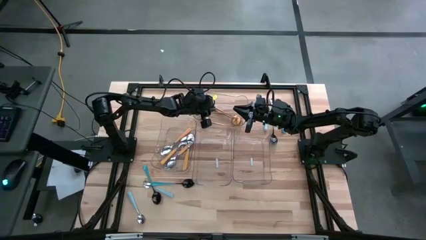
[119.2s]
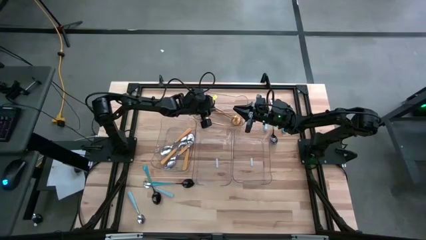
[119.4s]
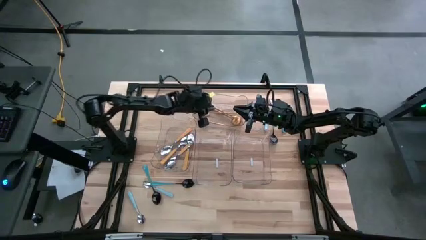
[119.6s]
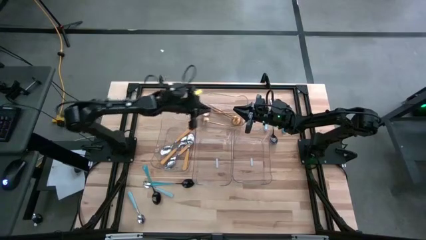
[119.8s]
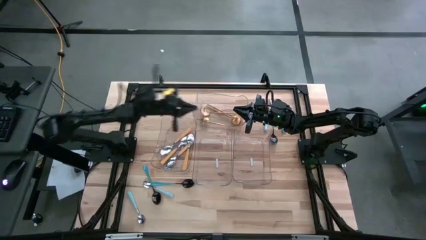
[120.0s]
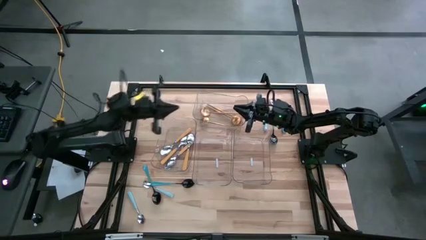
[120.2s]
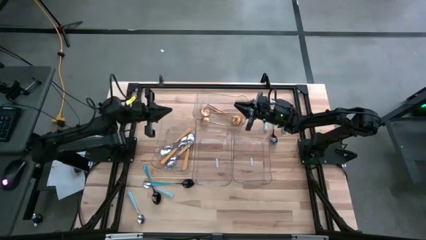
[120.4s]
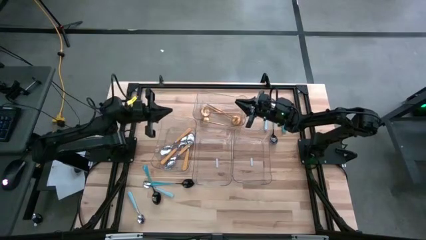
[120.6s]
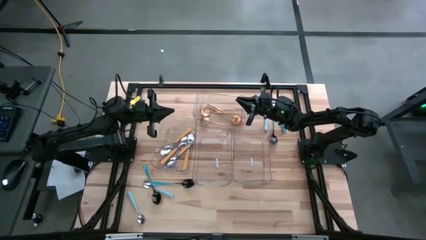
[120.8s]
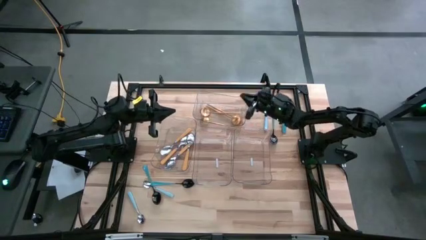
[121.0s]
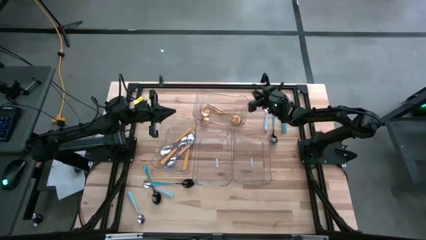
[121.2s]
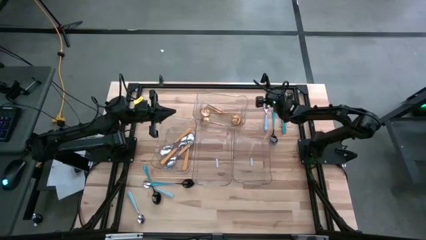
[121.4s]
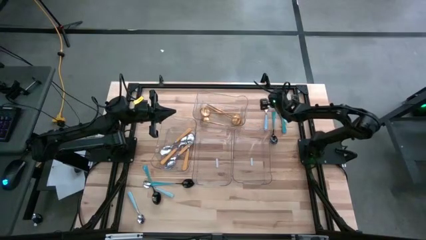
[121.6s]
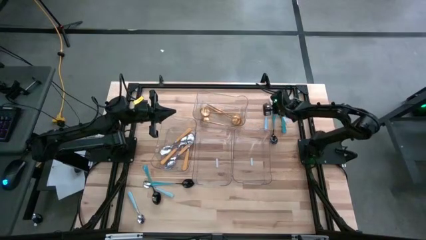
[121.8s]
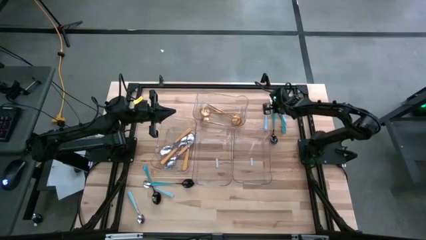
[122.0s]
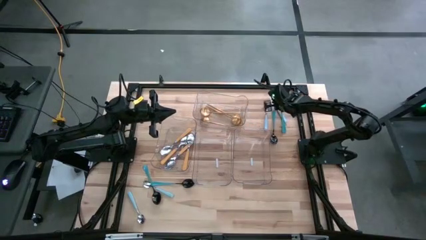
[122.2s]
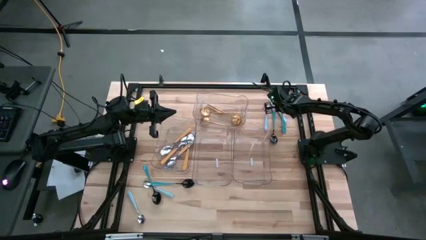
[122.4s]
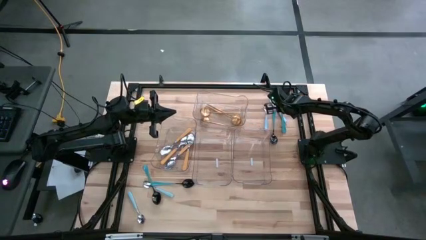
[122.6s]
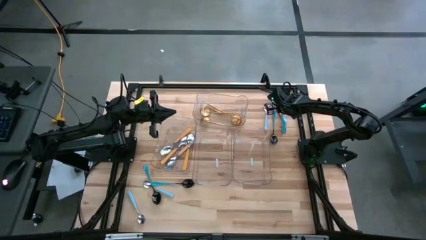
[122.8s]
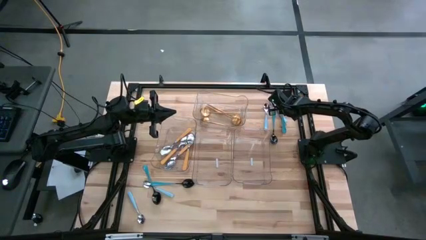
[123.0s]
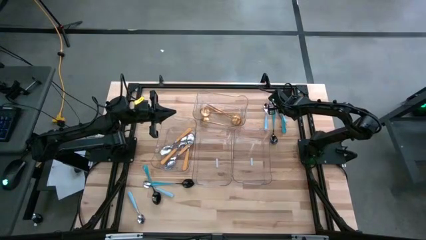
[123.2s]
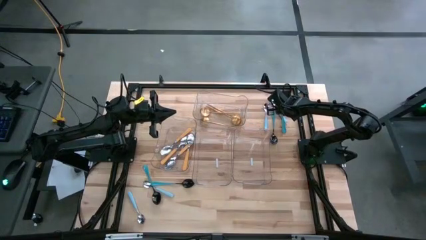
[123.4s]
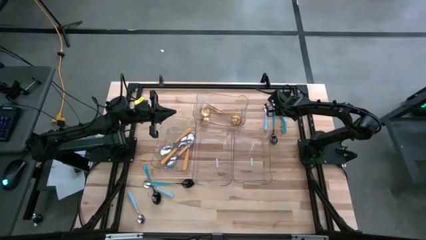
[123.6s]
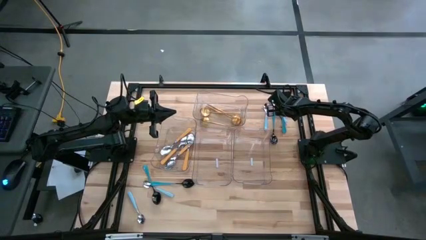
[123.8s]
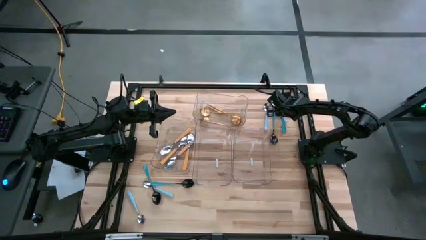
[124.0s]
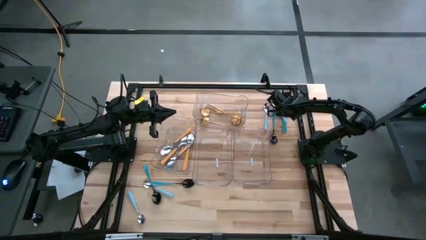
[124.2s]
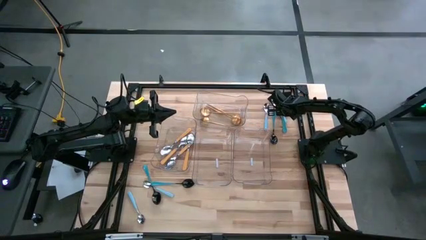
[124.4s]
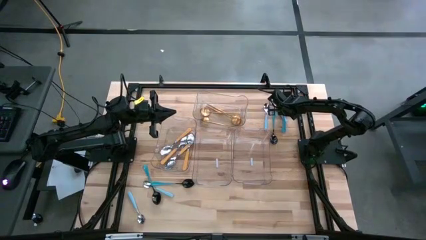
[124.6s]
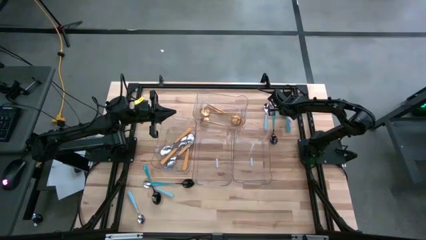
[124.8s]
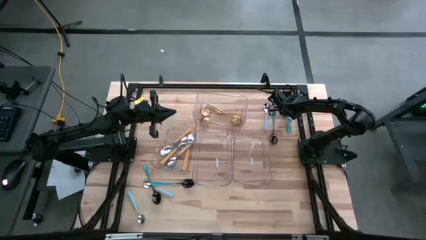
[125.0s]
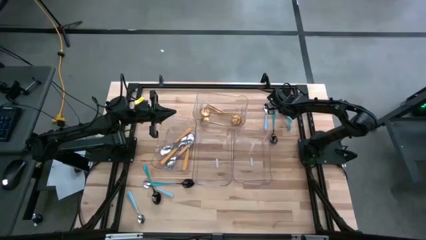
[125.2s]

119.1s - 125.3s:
Task: Sort silverware by color (type)
Put the blue spoon into the right transparent bin

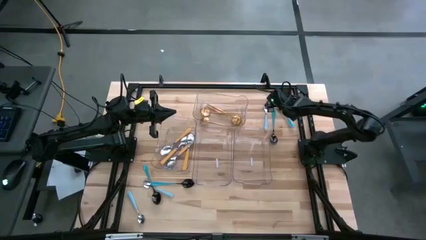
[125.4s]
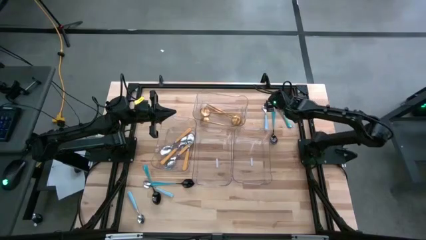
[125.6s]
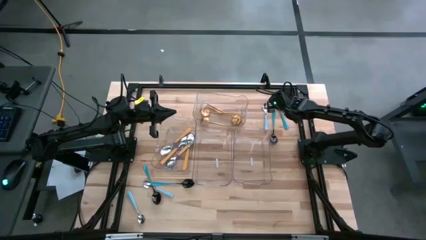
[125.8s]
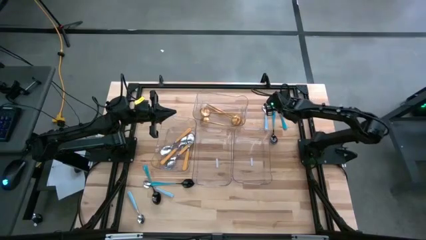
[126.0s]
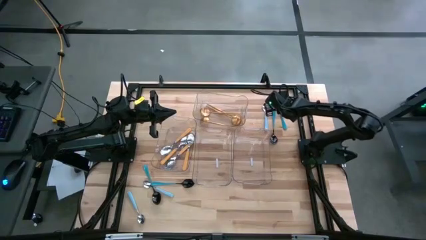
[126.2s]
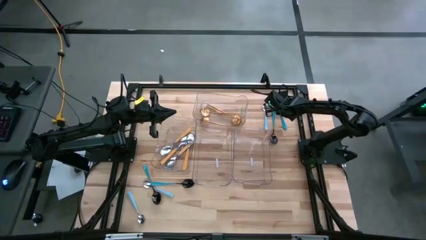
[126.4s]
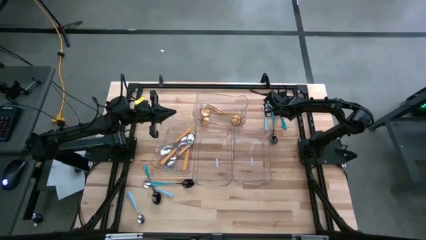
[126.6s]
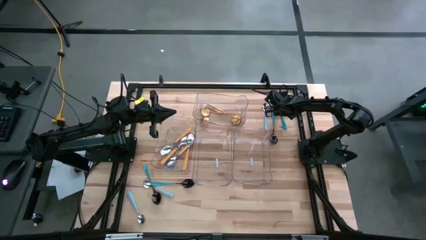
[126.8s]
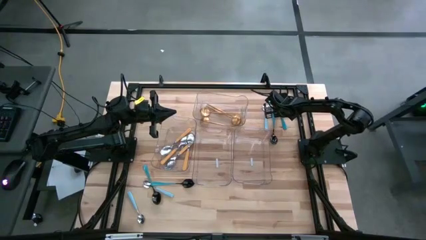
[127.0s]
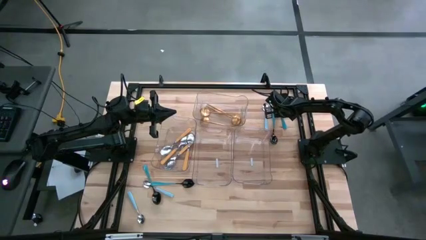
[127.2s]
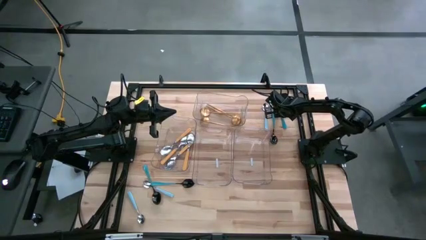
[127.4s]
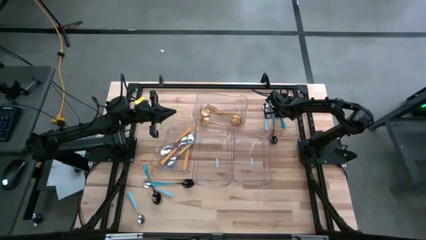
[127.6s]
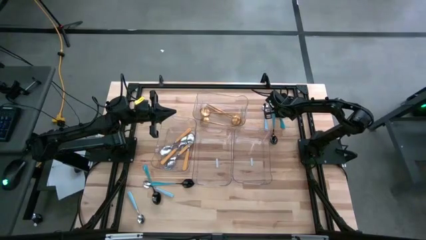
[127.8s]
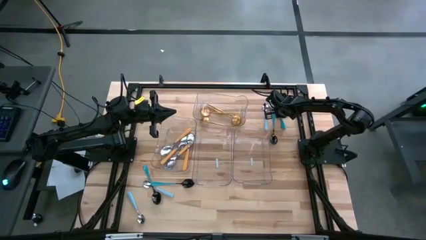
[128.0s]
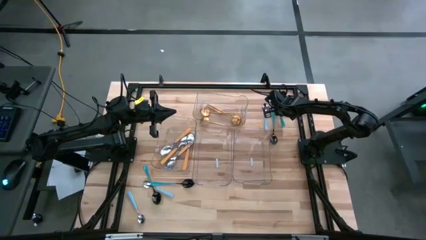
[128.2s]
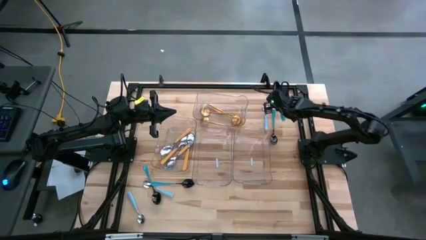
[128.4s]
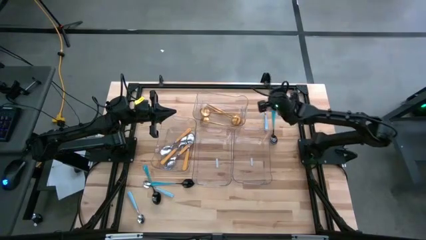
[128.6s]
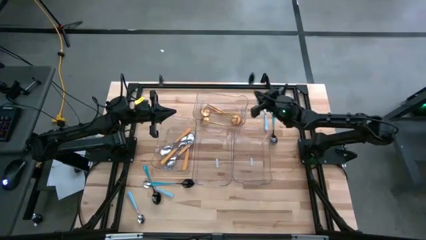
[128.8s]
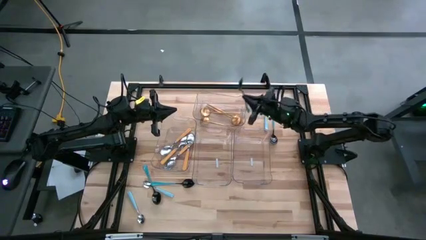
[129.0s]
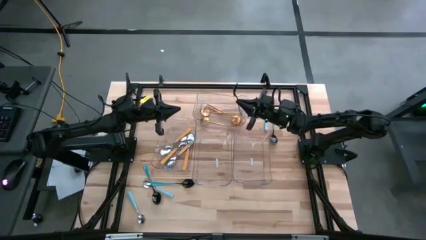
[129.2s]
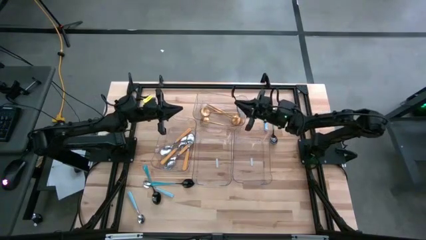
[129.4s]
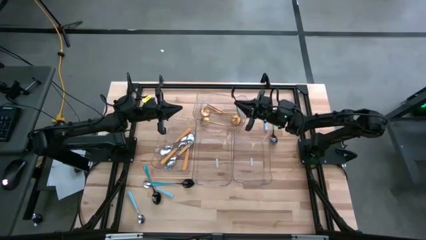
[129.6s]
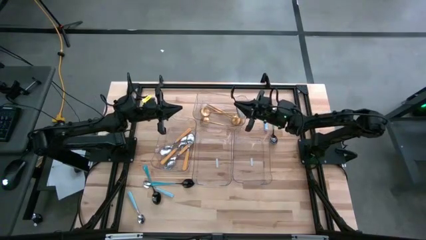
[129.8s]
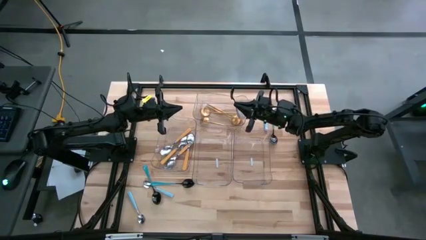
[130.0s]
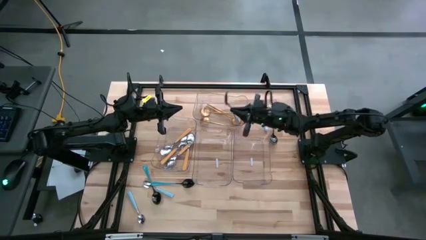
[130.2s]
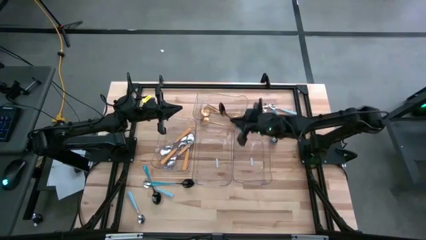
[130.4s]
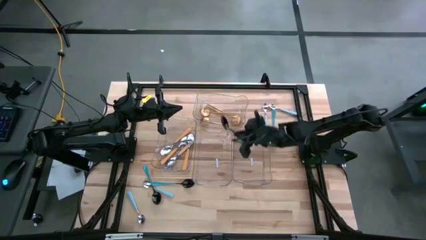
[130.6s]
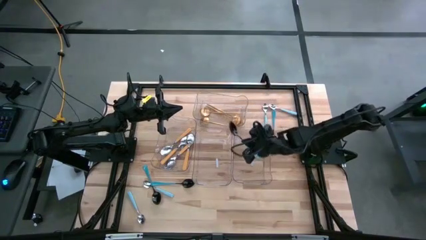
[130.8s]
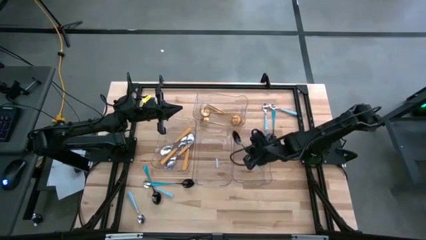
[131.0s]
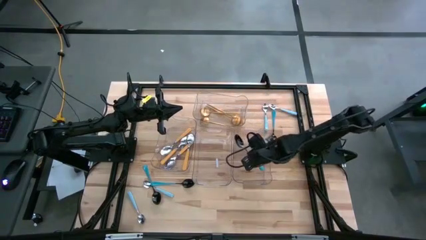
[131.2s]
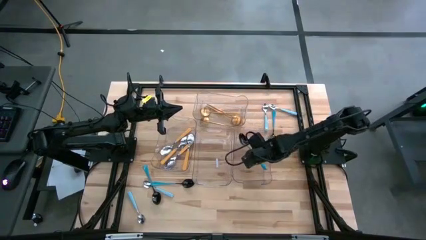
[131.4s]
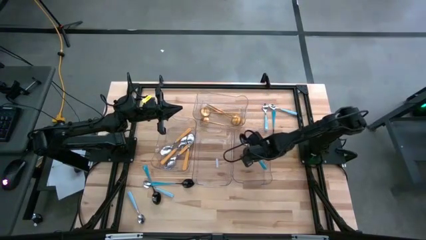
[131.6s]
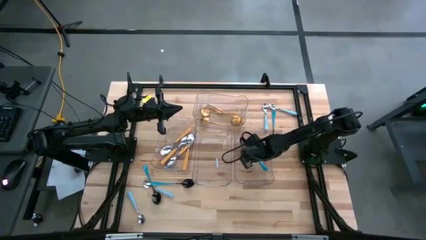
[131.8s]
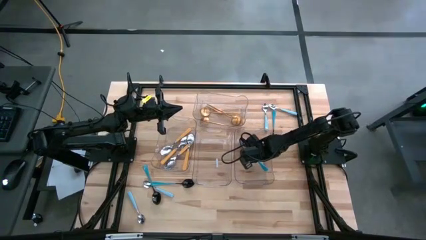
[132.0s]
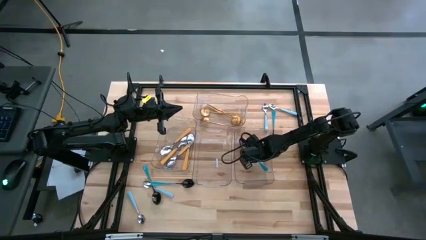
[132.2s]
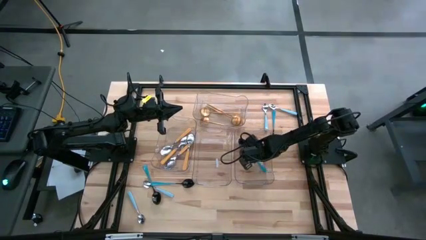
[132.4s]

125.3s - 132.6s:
Put the blue spoon into the right transparent bin

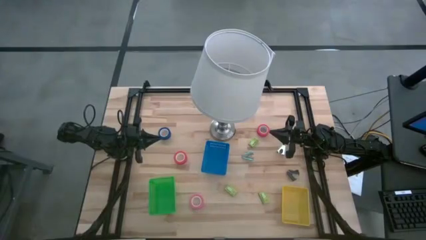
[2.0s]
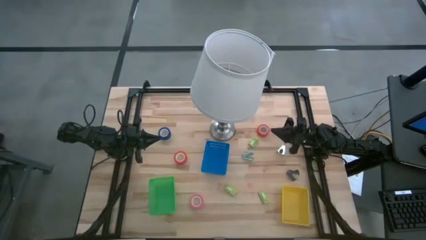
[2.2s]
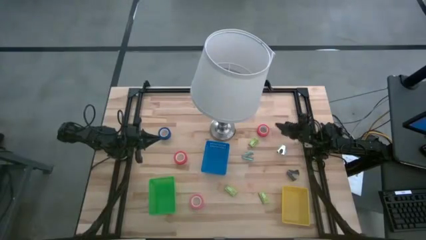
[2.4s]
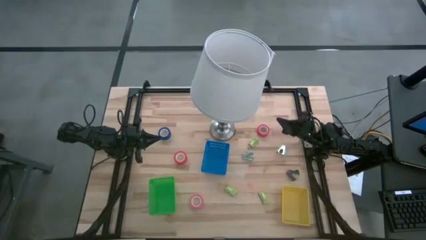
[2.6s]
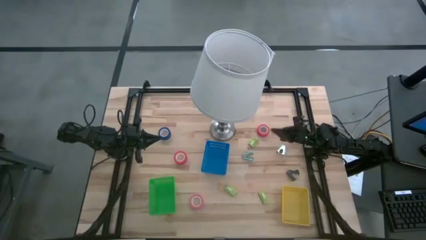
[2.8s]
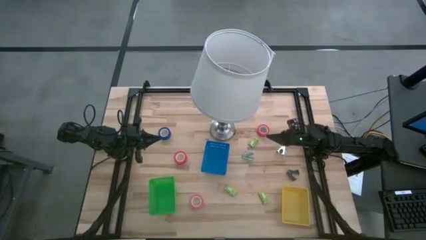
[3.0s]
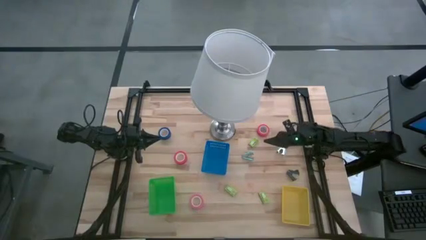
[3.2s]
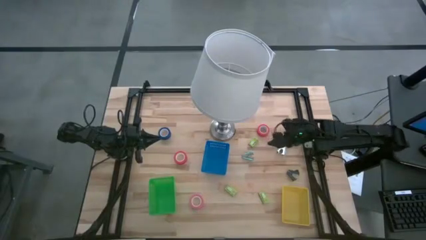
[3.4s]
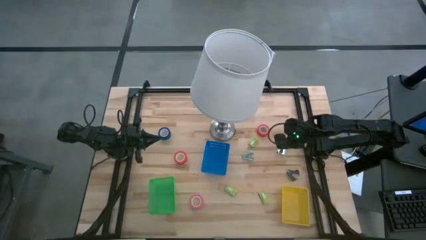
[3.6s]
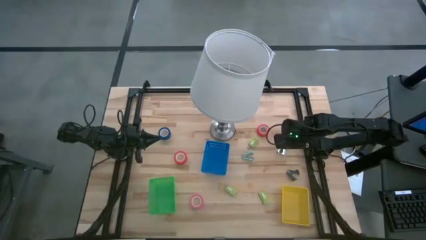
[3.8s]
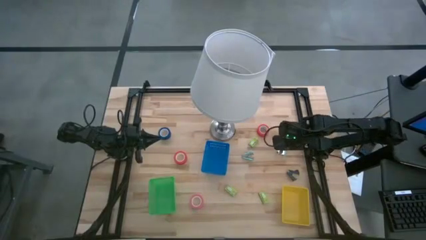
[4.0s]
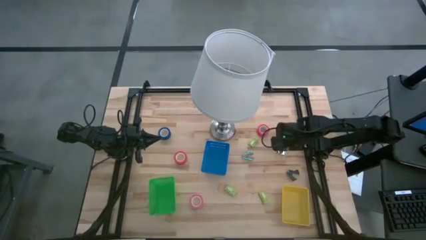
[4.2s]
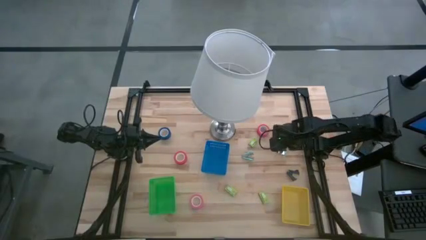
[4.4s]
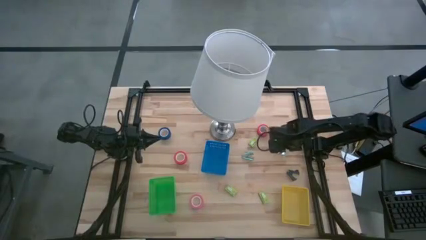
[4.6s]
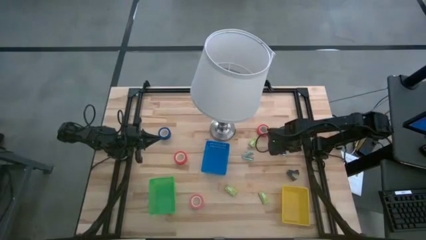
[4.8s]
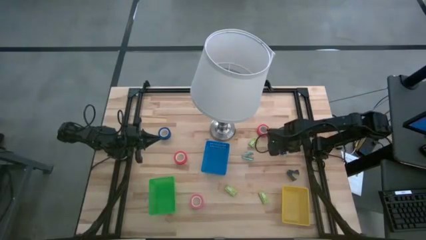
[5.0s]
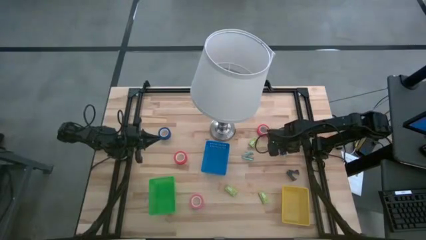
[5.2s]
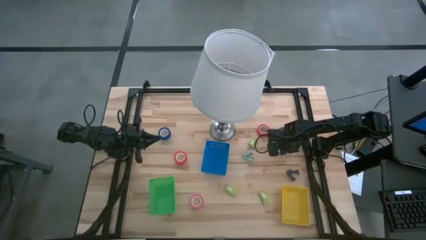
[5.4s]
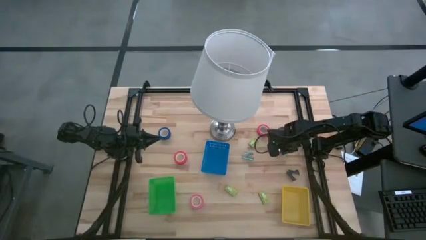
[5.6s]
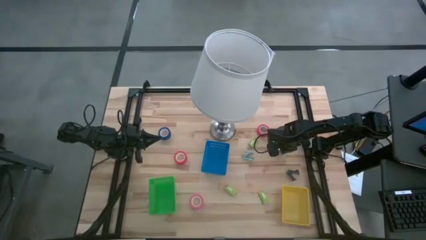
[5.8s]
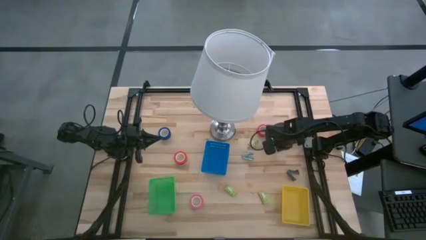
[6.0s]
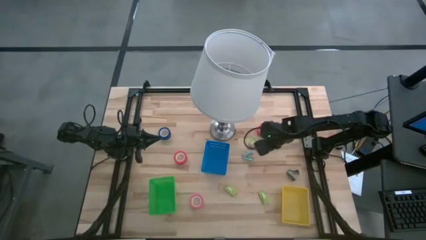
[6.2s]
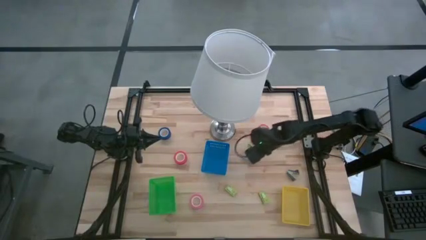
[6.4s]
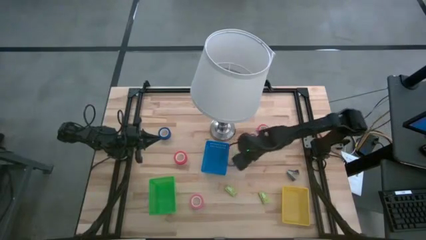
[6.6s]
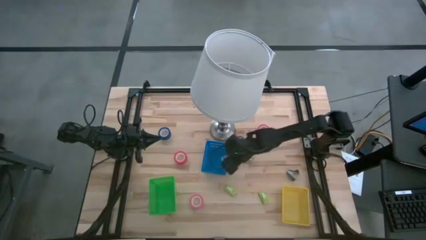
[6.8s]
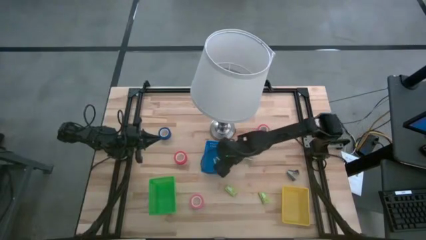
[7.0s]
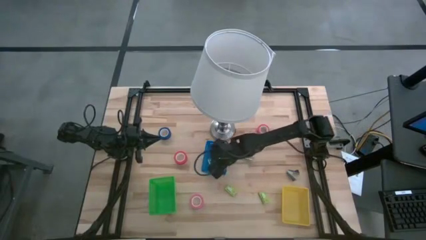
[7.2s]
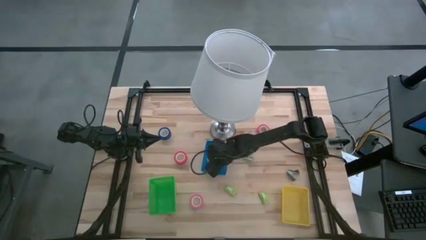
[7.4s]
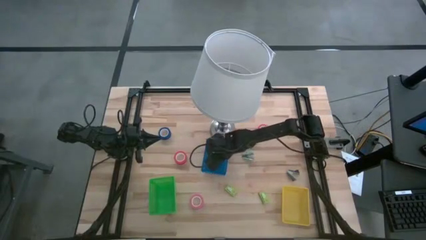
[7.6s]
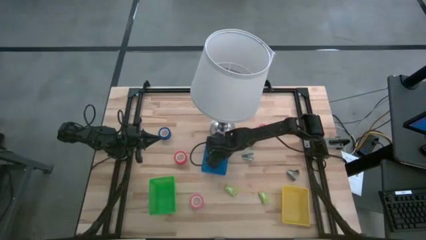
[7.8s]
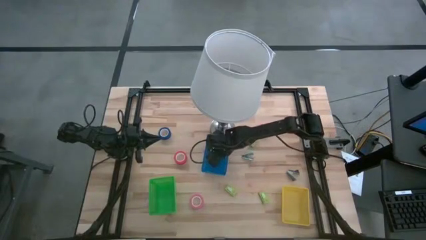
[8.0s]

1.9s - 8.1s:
Task: Pick and place Stapler, Stapler remover, tape
Put the right blue staple remover into the blue bin
